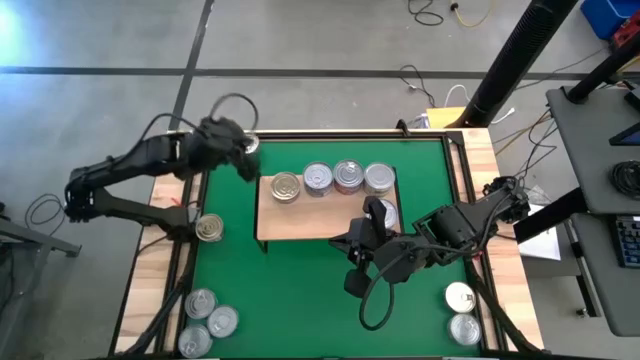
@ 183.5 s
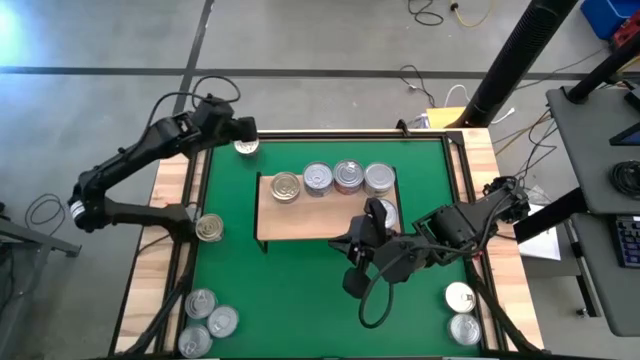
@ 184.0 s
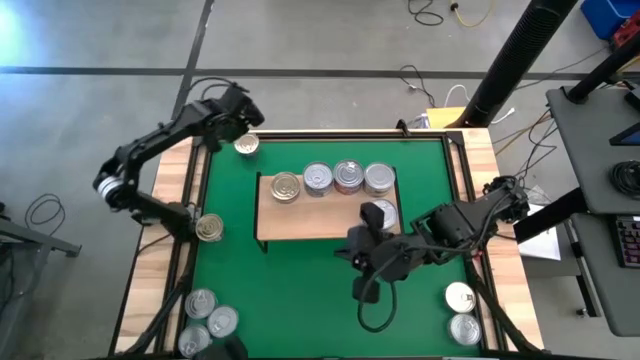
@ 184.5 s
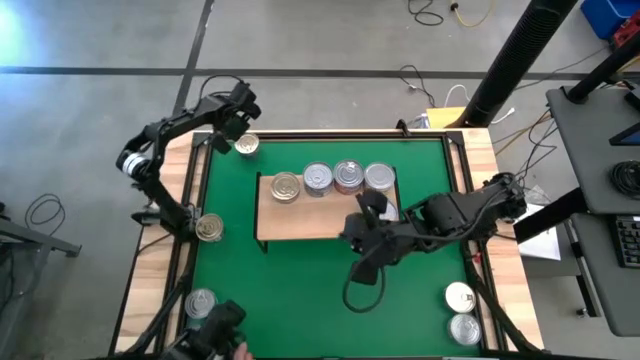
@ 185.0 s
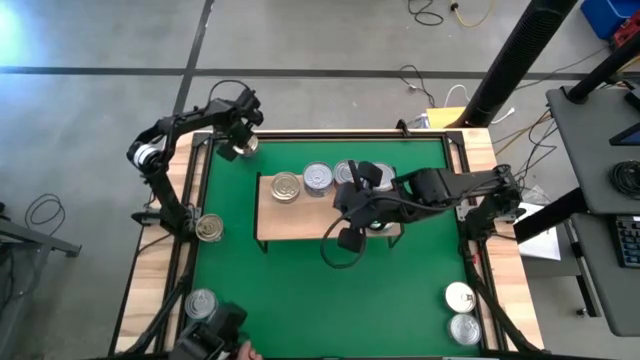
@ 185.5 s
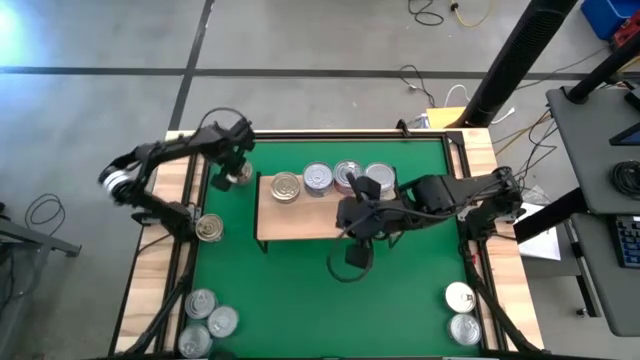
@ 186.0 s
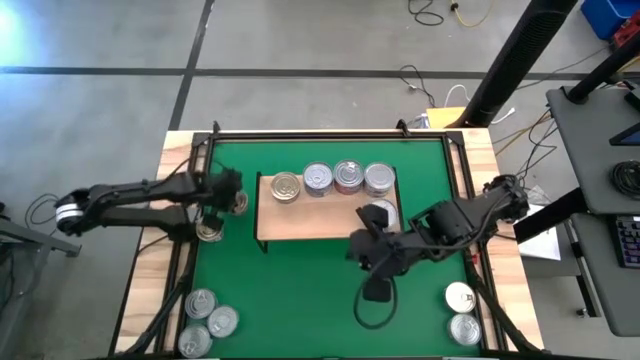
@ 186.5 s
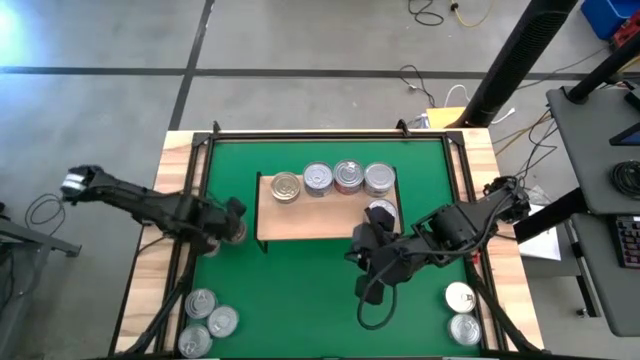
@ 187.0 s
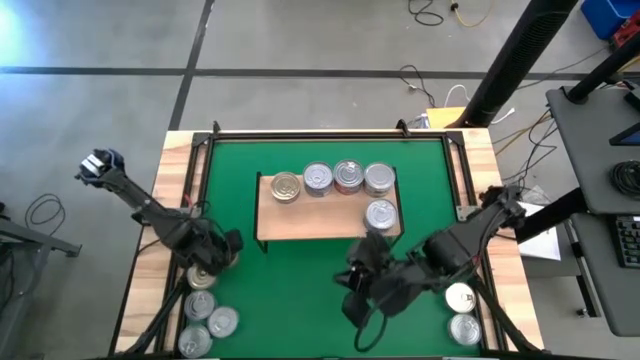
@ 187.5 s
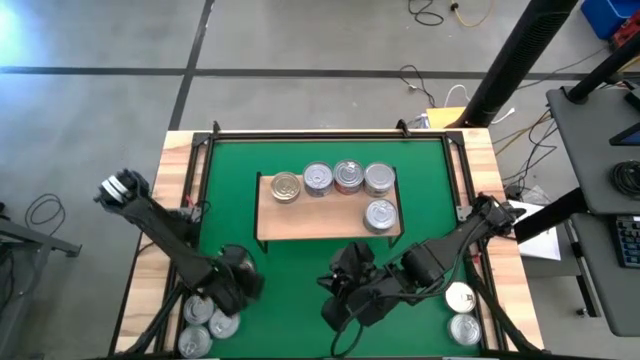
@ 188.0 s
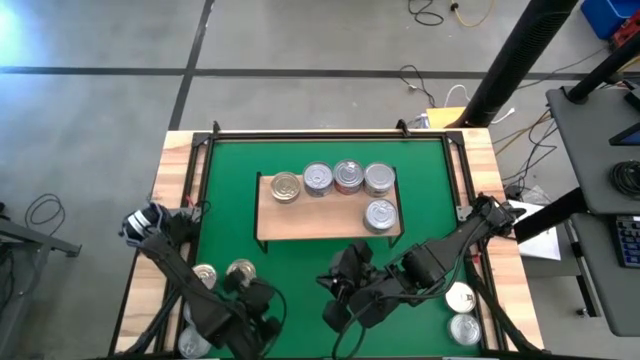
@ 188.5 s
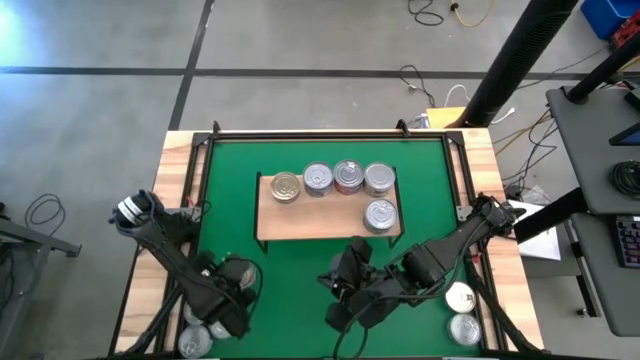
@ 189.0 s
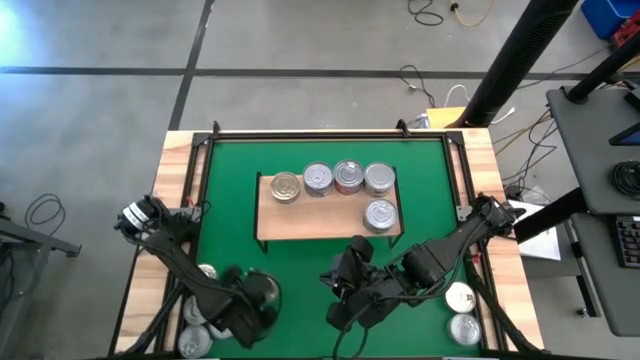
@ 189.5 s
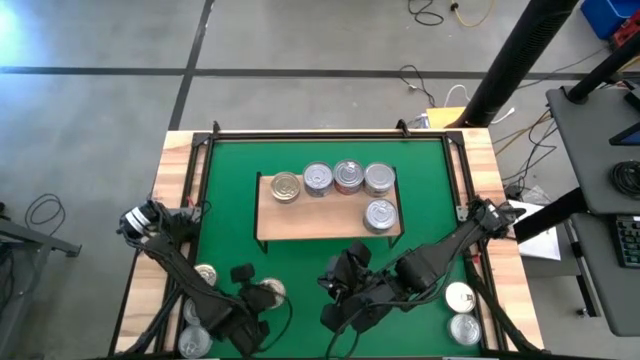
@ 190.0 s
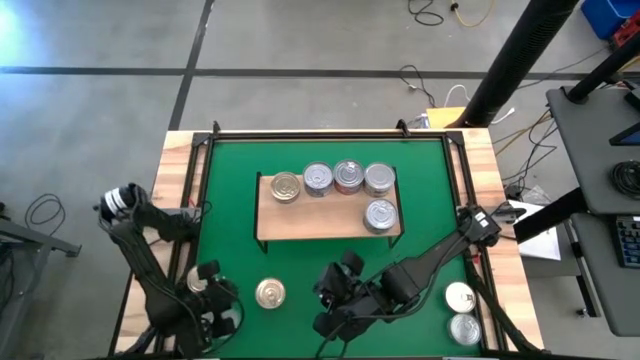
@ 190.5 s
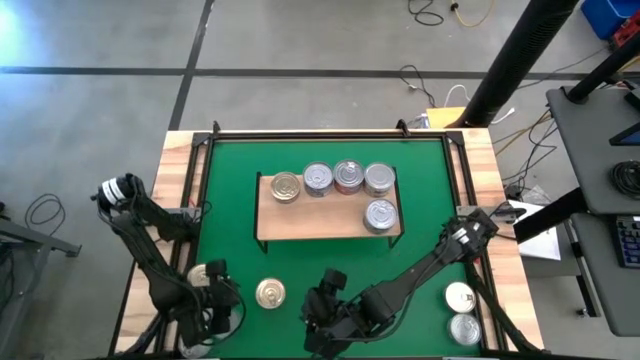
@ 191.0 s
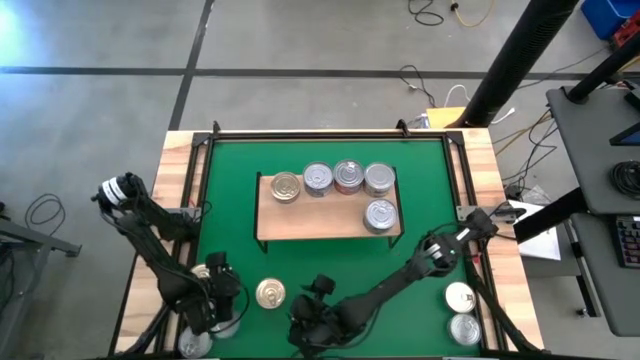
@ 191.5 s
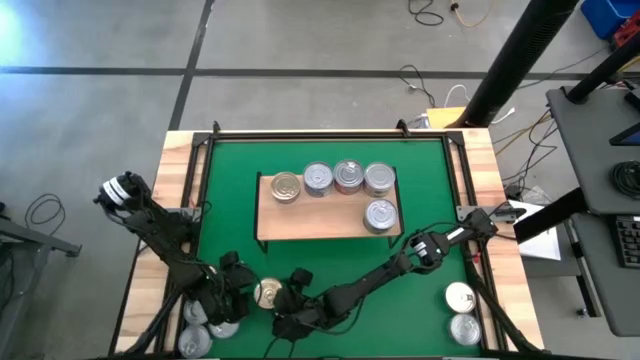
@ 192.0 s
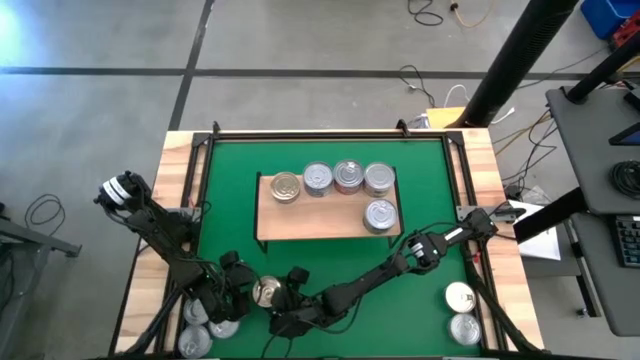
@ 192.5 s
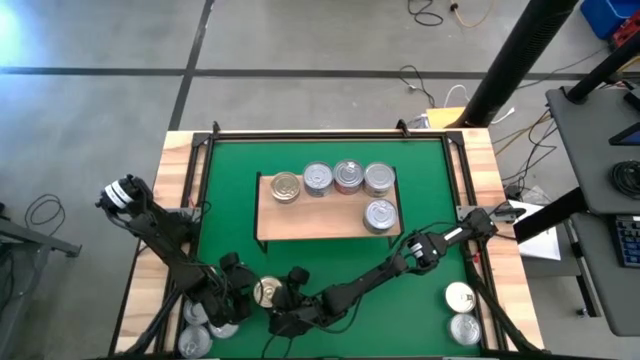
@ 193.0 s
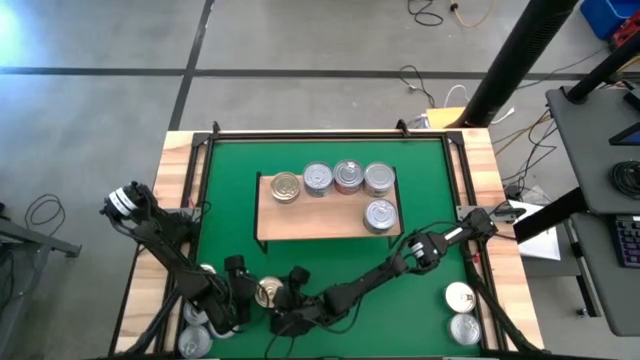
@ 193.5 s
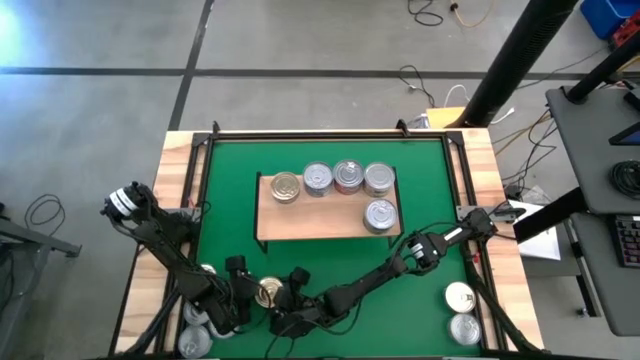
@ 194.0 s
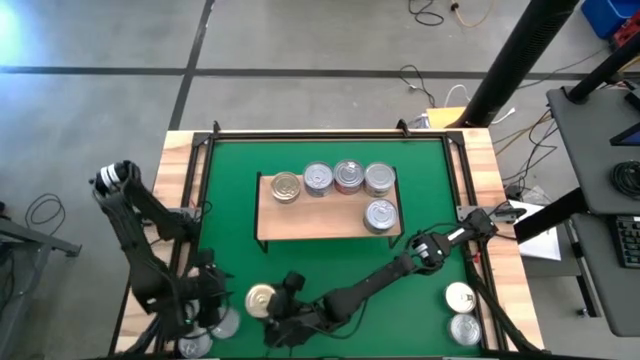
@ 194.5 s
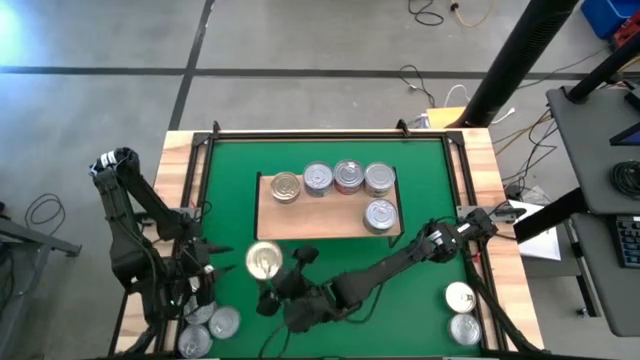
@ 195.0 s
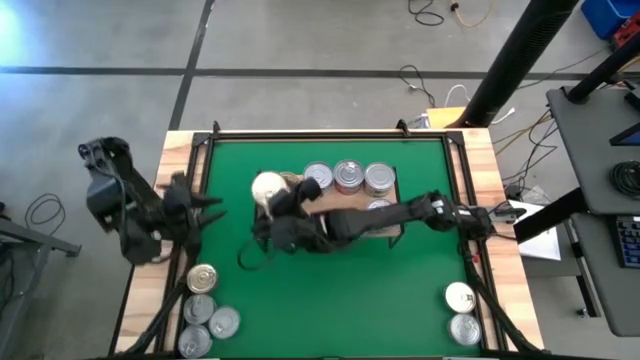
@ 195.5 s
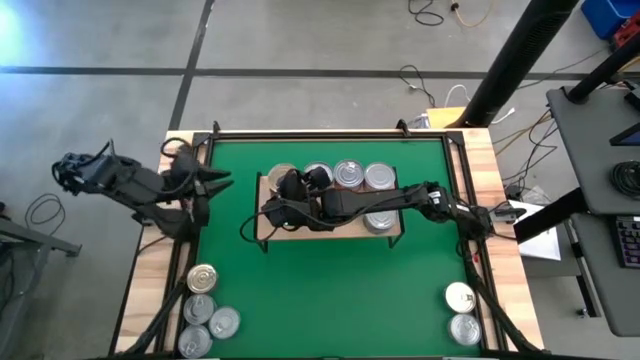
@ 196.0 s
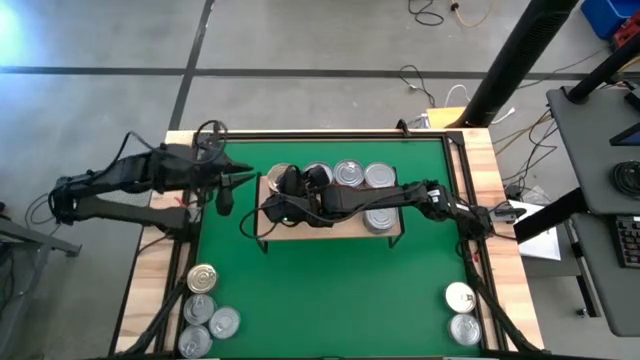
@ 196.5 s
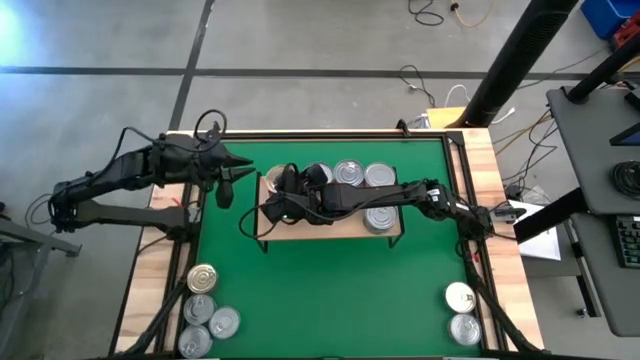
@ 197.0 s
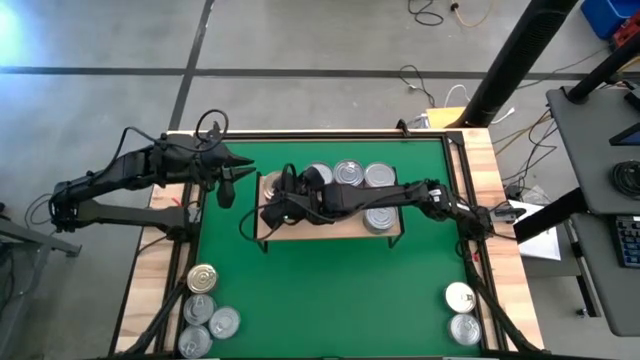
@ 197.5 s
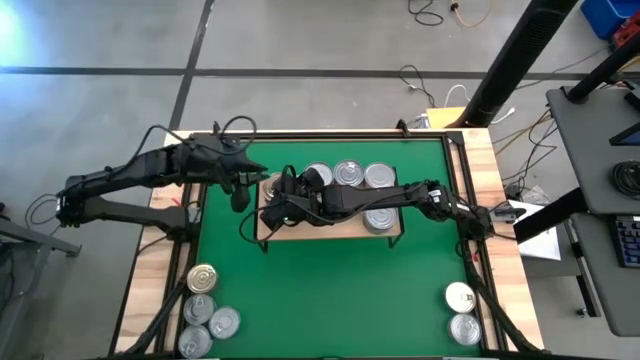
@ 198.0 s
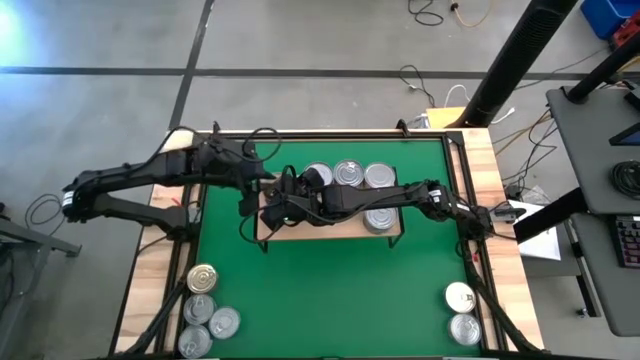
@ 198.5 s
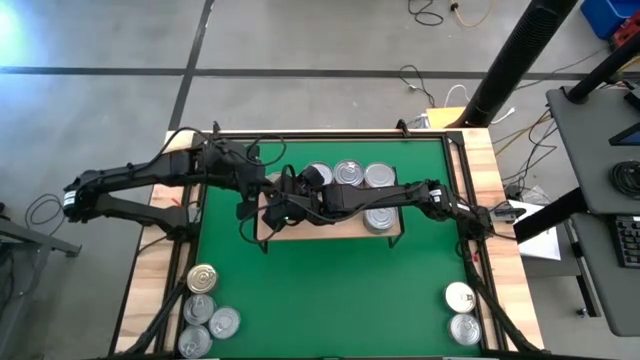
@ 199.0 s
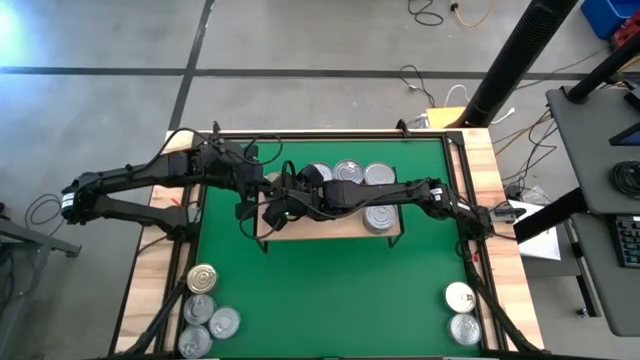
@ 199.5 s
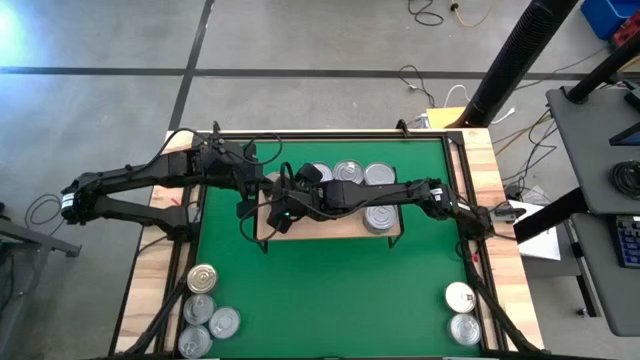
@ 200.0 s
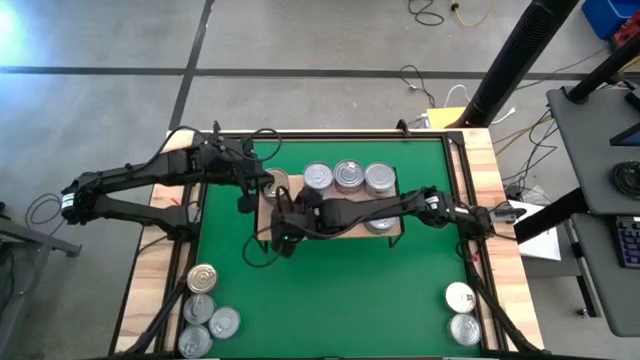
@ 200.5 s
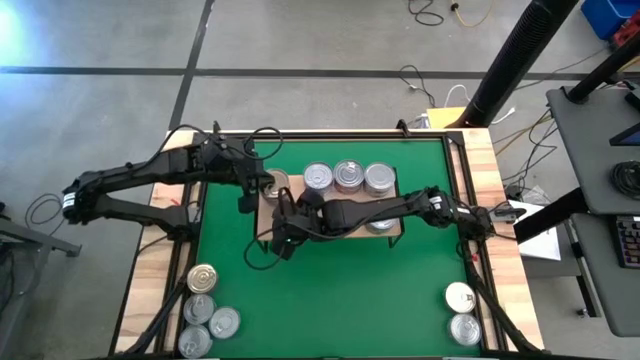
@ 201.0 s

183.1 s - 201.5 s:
Task: Stack canned seafood by type on shelf
Stack the top left blue and pink tuna can on top of the blue and pink tuna can on the shelf
